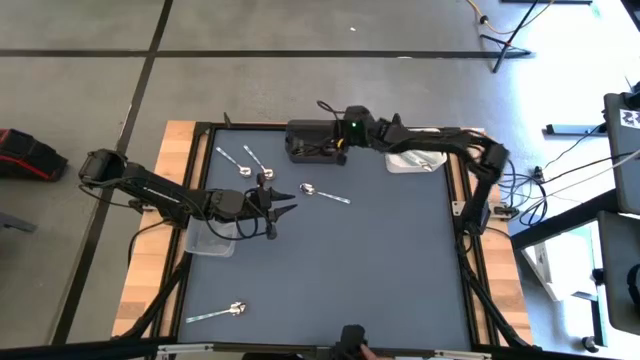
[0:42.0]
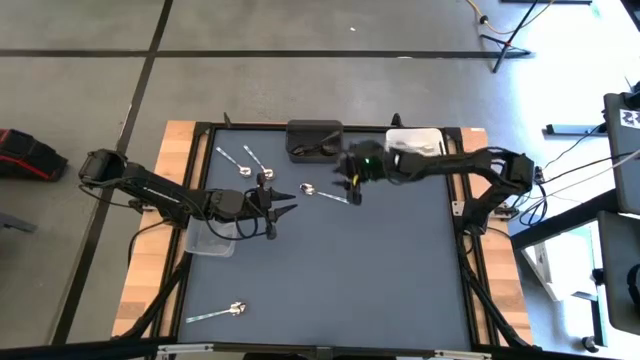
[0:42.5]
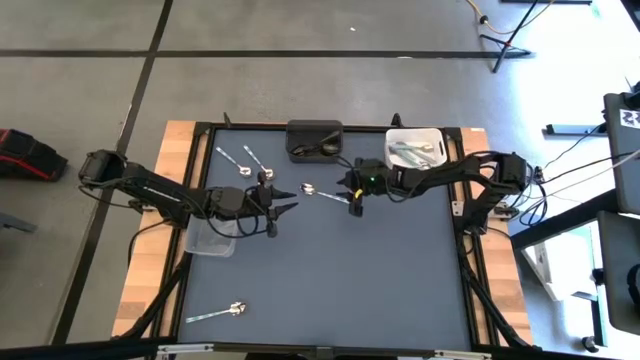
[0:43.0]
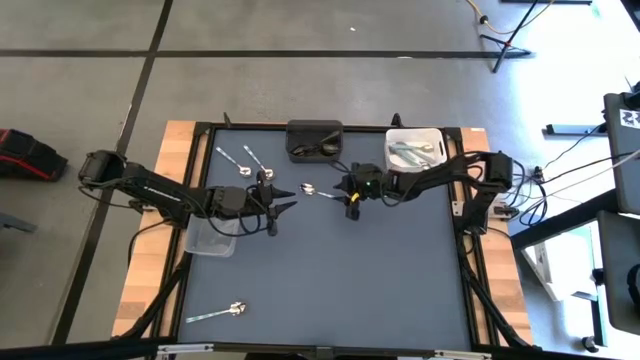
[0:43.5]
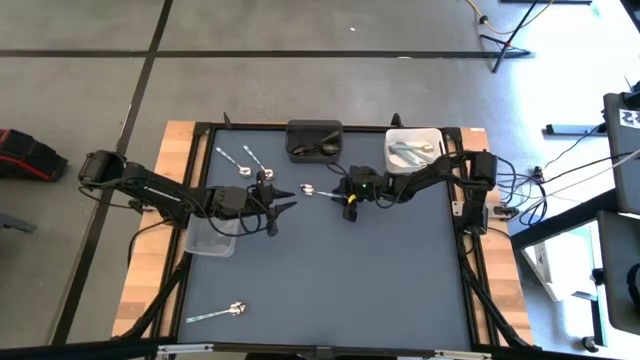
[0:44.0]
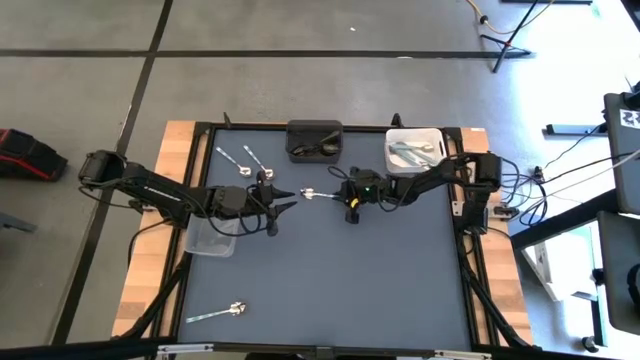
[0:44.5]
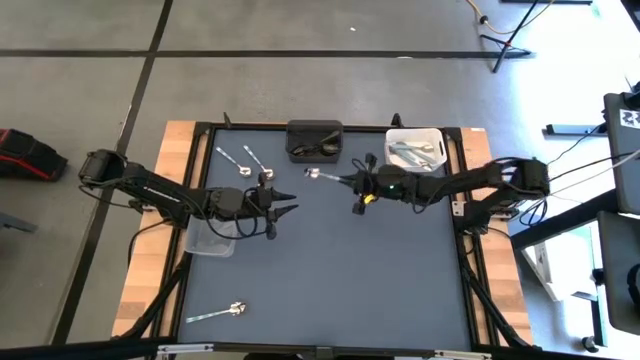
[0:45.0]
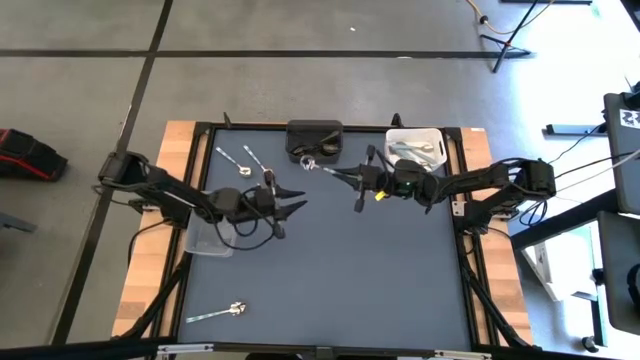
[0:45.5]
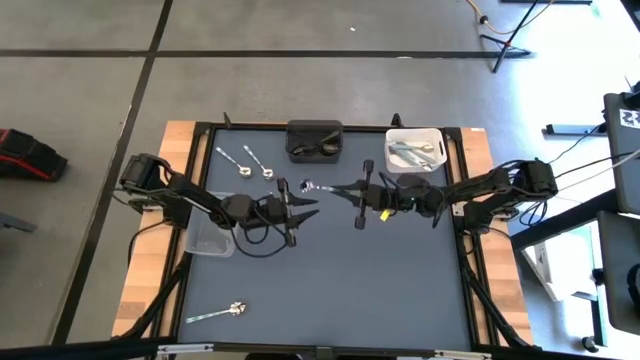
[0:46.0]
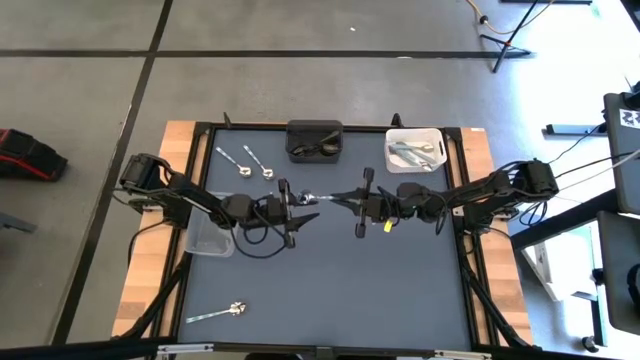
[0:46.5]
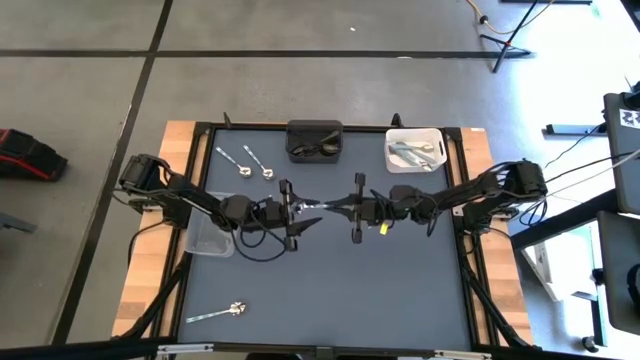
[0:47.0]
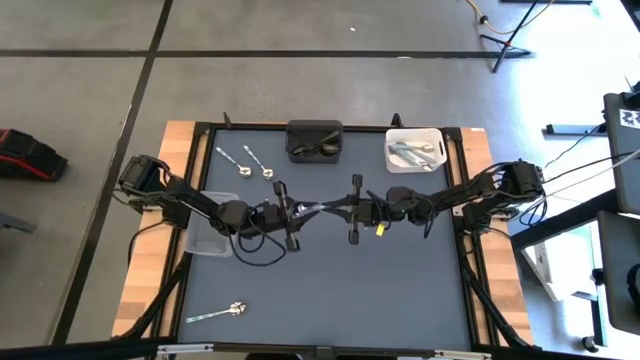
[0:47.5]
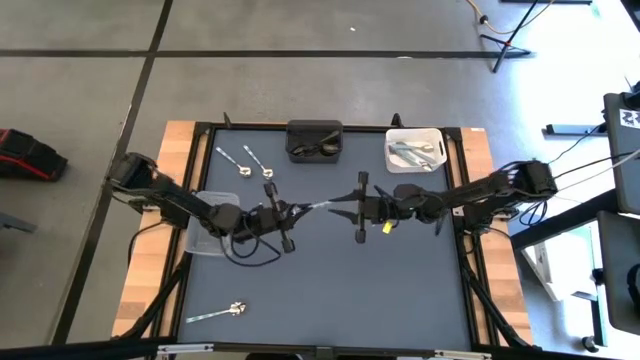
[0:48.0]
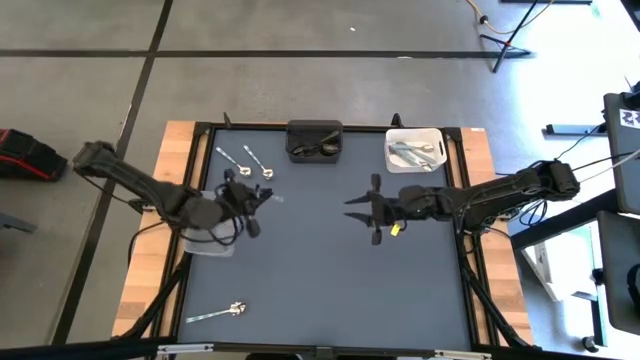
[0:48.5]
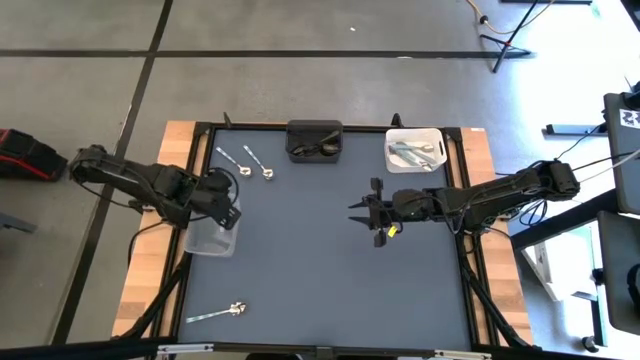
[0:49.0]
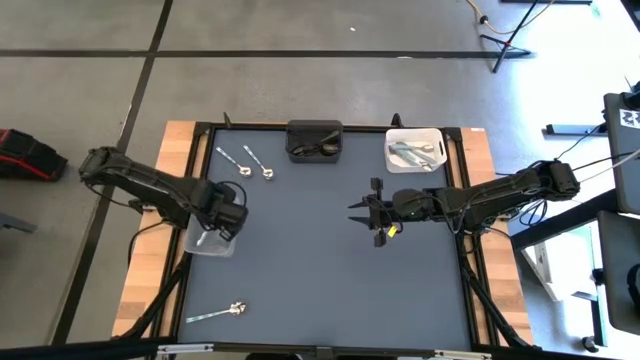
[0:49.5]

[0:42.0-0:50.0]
Task: Sort silverware by color (type)
Put the right blue spoon into the transparent bin

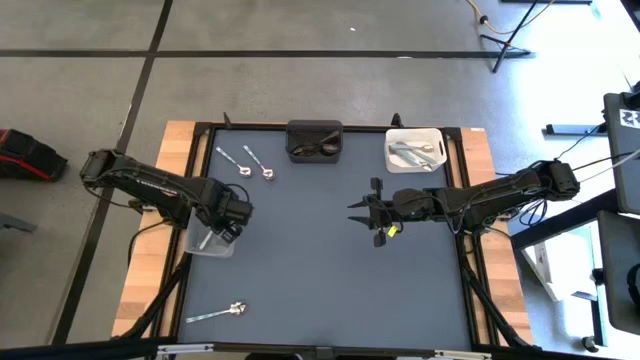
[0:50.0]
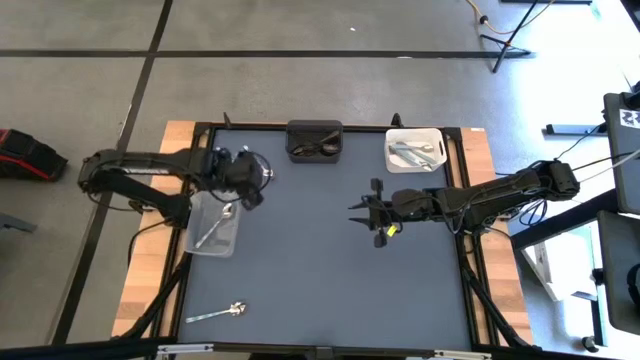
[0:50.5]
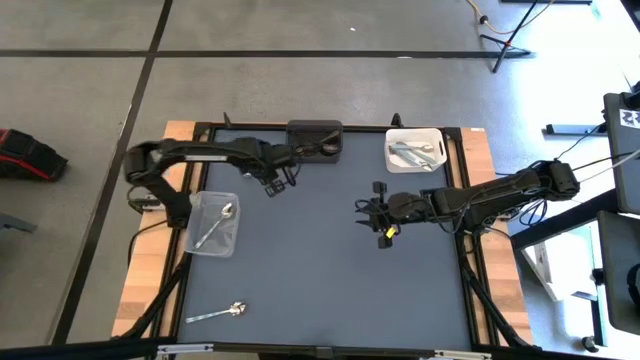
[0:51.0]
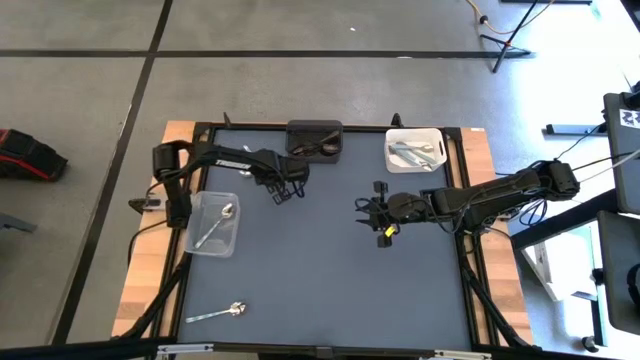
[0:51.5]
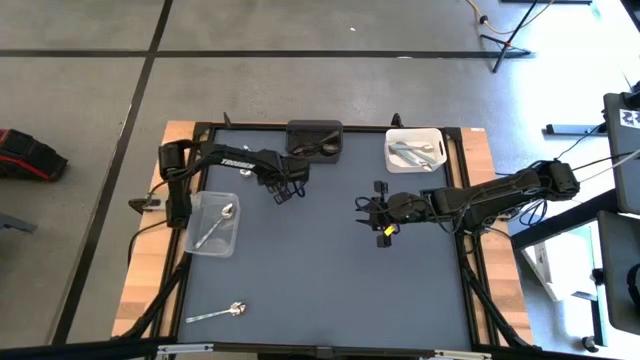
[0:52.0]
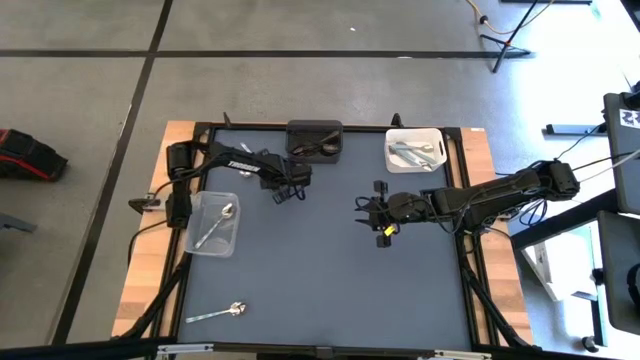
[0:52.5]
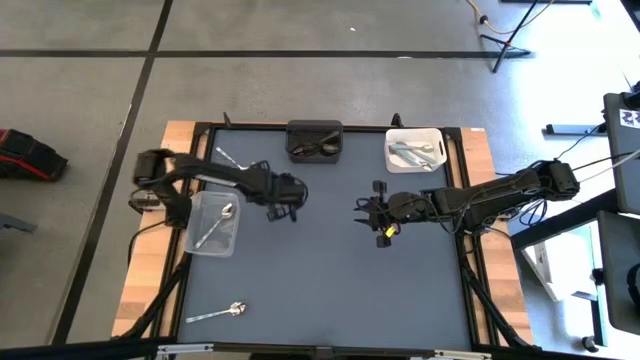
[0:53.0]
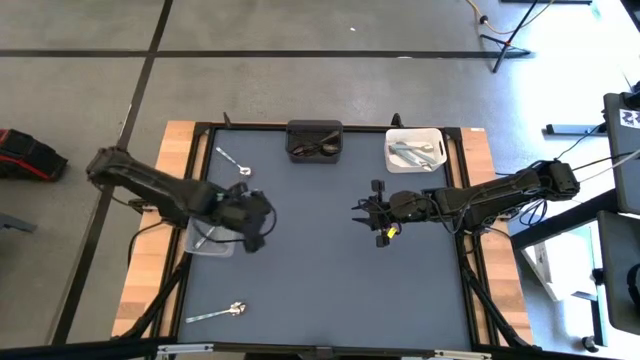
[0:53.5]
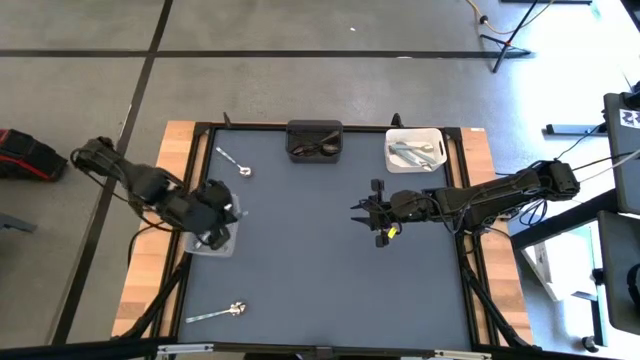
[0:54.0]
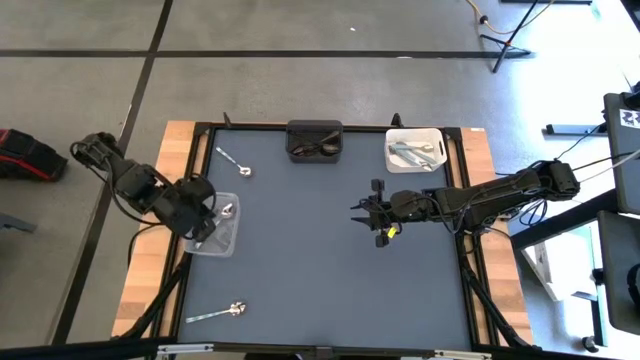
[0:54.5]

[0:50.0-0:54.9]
Put the right blue spoon into the transparent bin

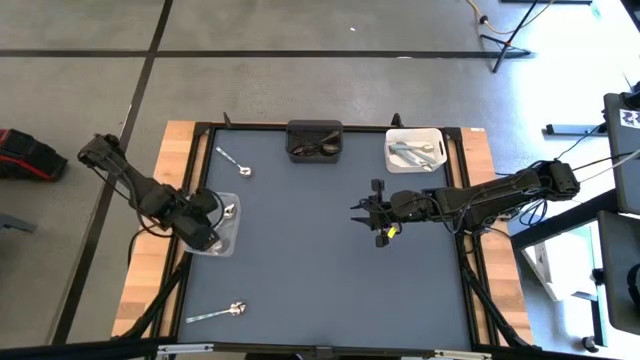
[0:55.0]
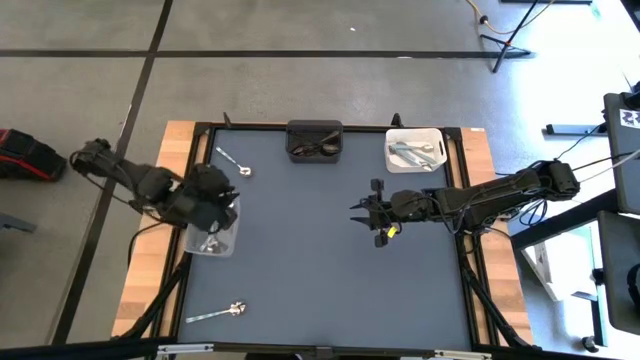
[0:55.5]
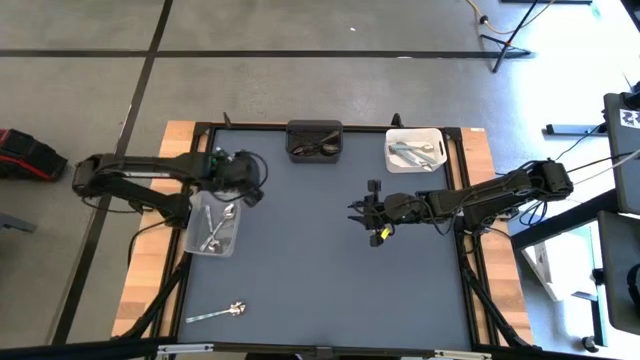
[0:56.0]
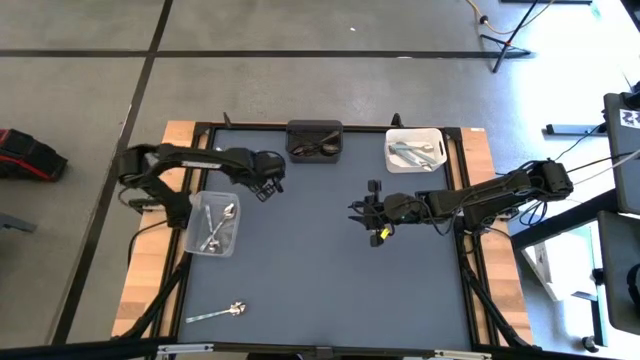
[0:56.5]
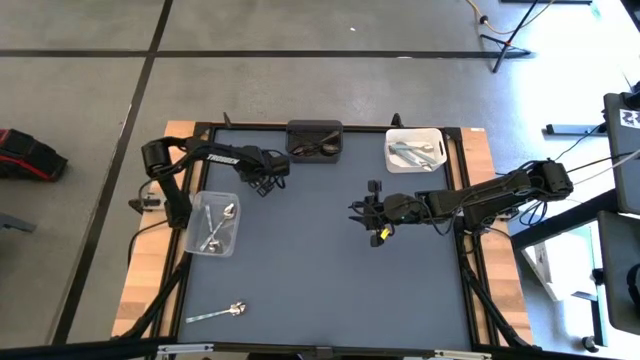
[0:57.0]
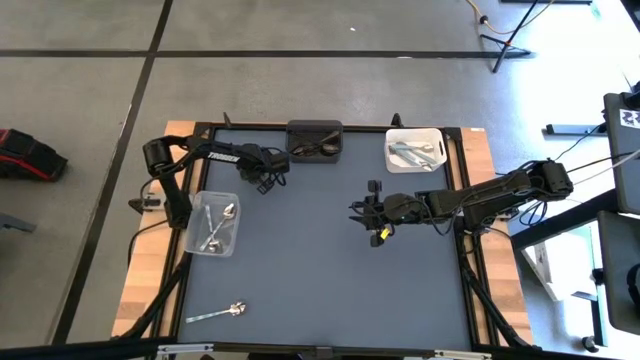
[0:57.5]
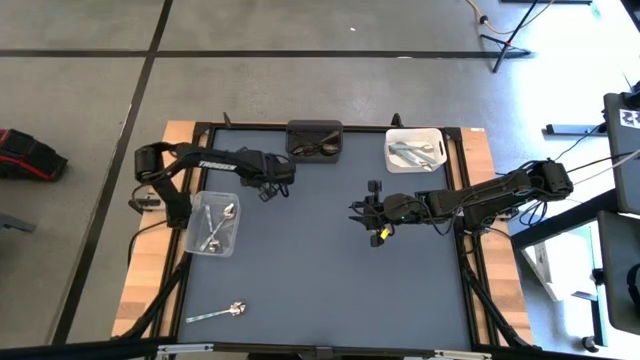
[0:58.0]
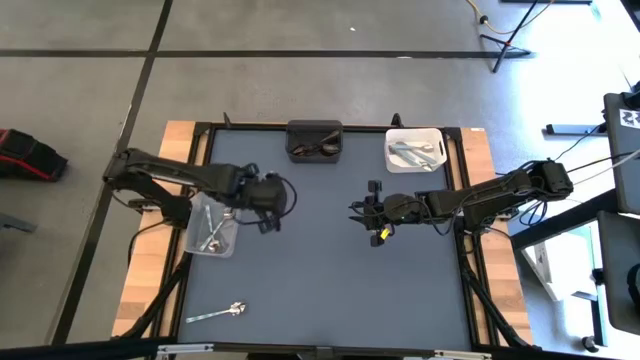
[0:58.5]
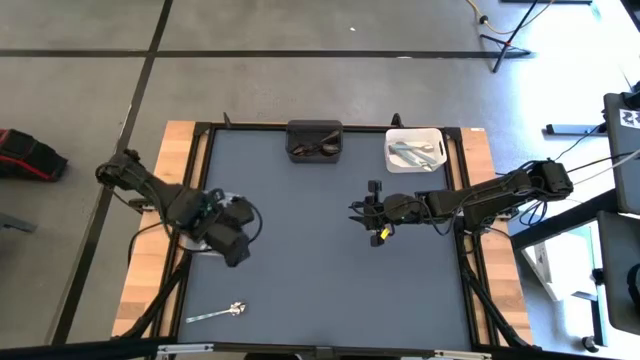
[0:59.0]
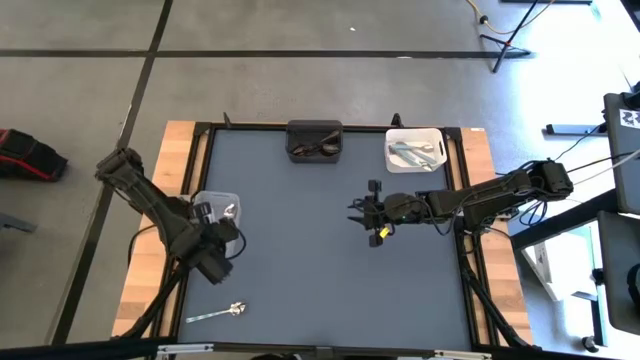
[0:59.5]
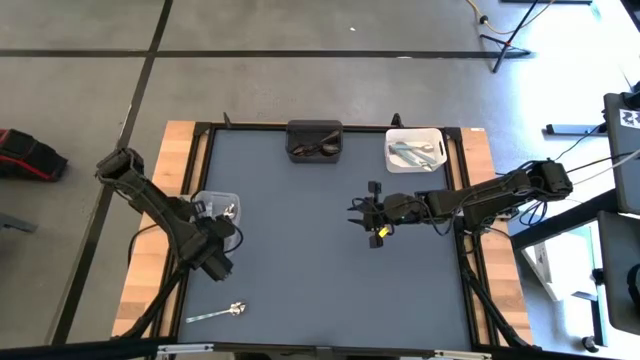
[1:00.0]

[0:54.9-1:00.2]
Put the top blue spoon into the transparent bin

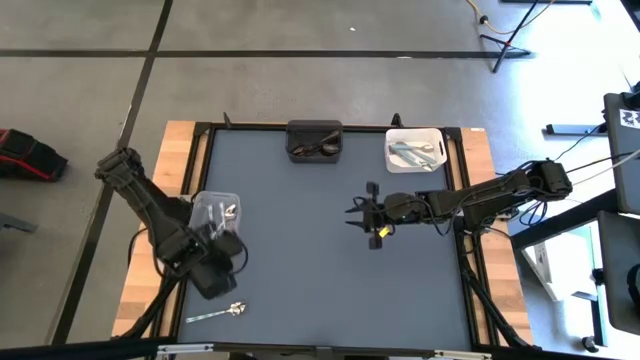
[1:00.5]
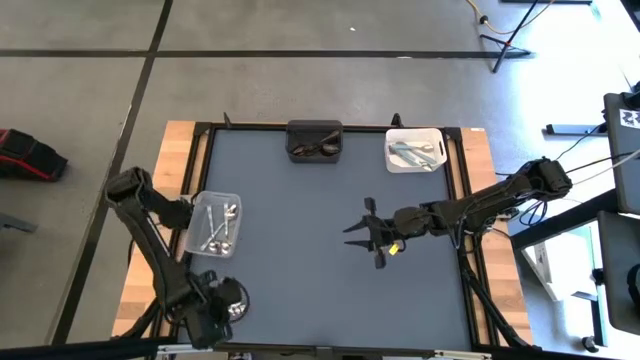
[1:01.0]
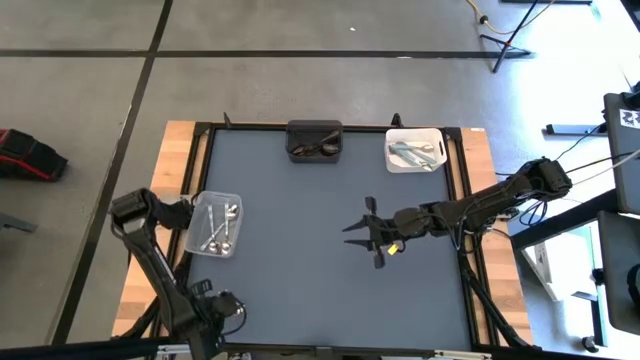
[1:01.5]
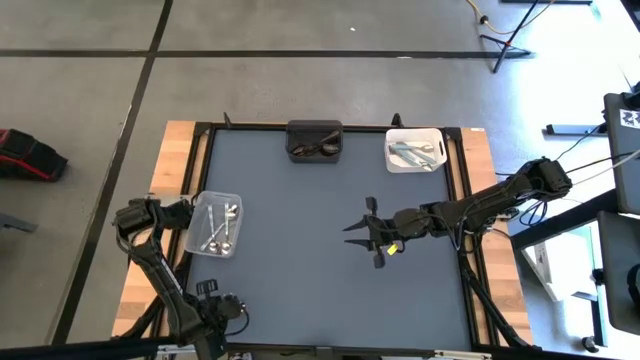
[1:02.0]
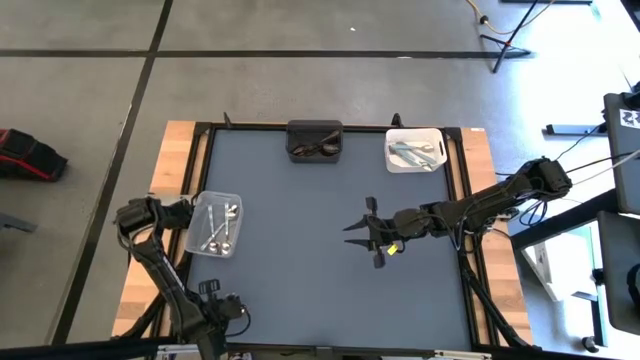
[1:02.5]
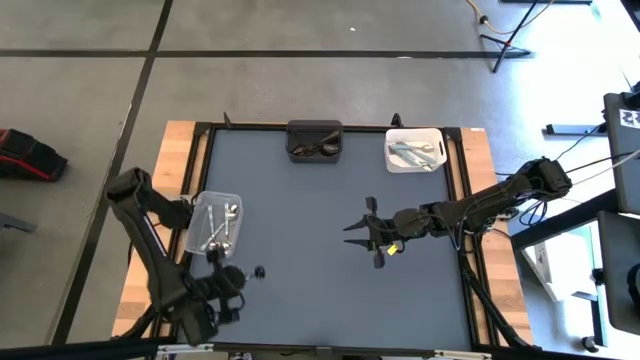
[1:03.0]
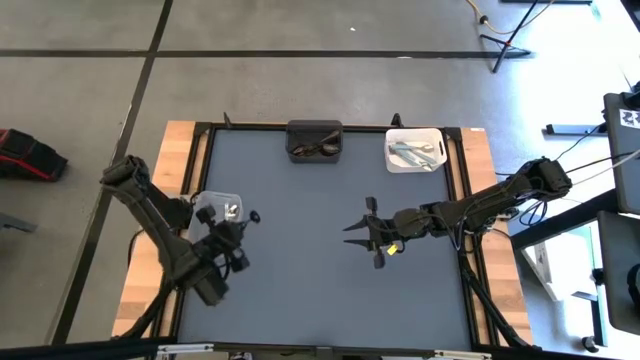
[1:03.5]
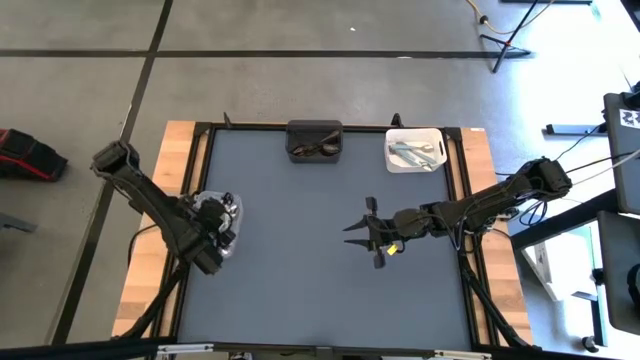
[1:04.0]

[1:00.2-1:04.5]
Put the blue spoon into the transparent bin
